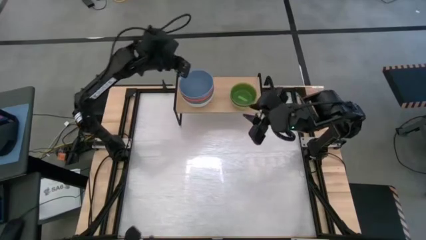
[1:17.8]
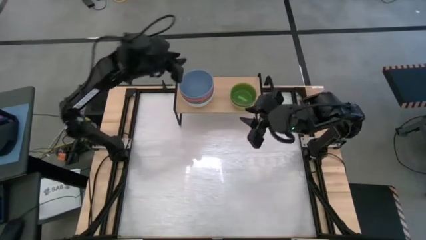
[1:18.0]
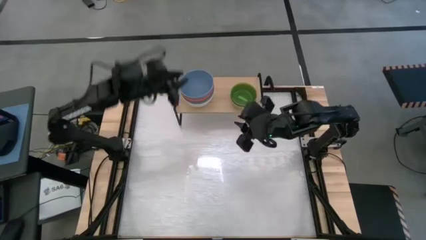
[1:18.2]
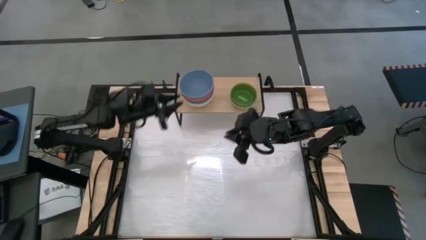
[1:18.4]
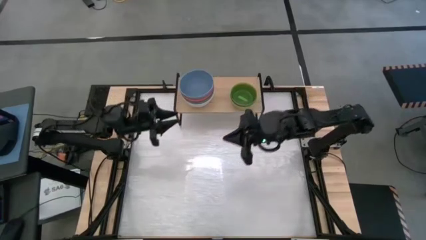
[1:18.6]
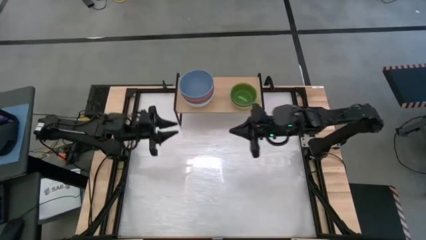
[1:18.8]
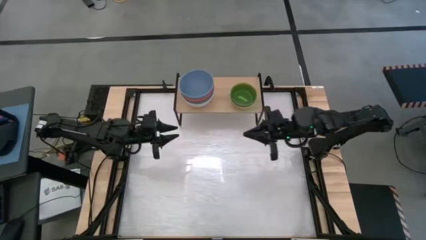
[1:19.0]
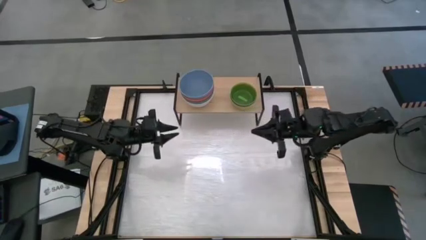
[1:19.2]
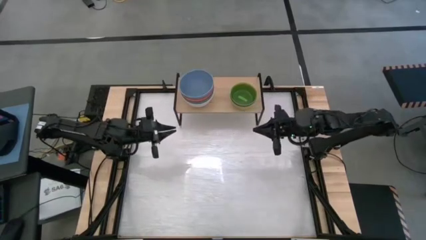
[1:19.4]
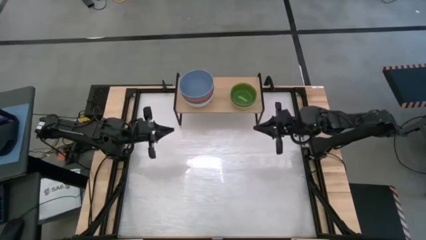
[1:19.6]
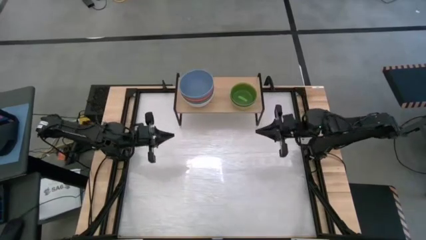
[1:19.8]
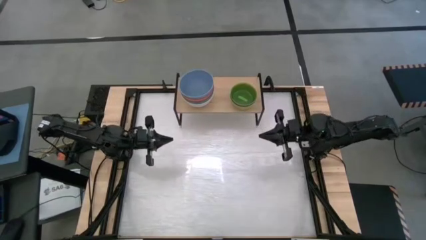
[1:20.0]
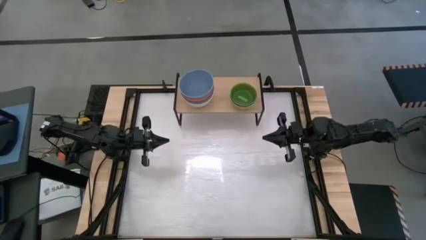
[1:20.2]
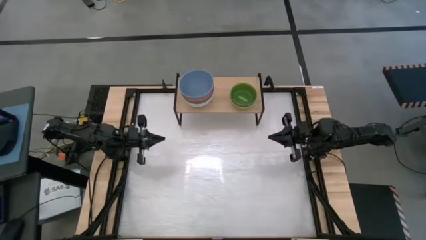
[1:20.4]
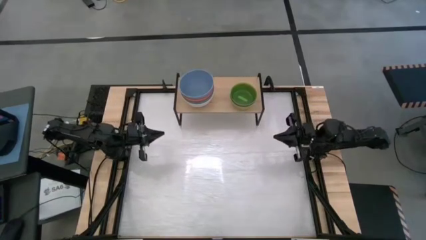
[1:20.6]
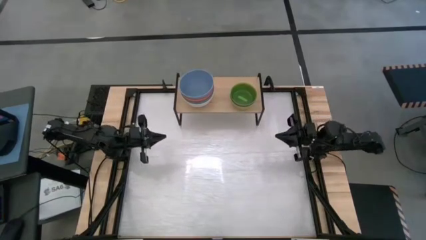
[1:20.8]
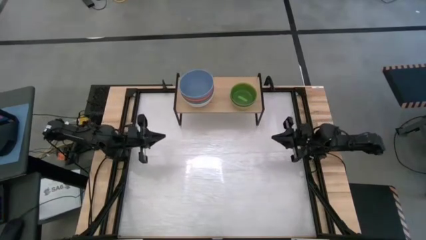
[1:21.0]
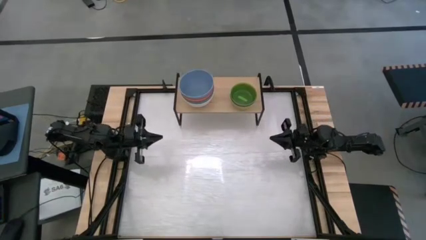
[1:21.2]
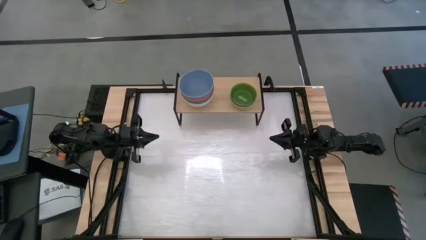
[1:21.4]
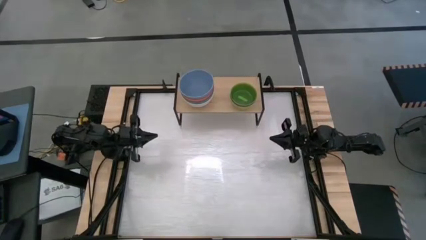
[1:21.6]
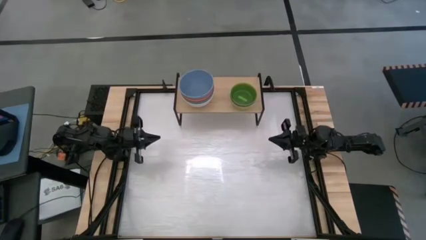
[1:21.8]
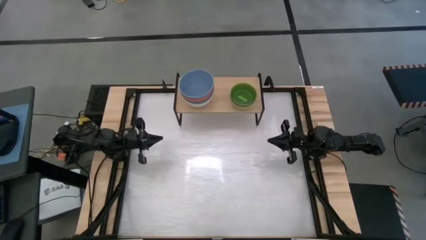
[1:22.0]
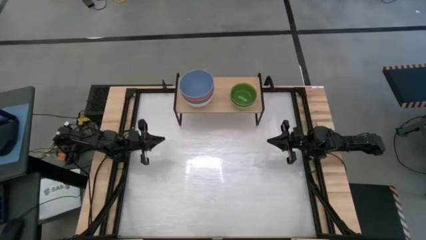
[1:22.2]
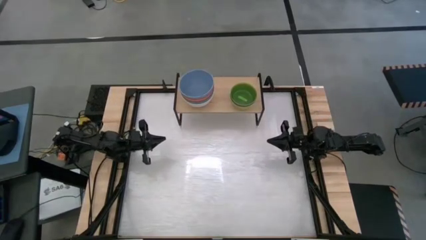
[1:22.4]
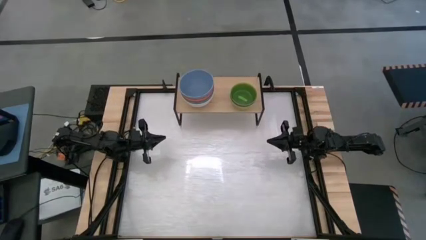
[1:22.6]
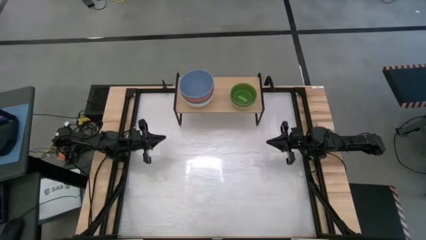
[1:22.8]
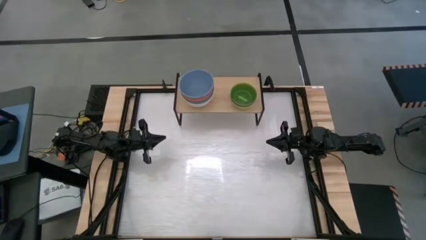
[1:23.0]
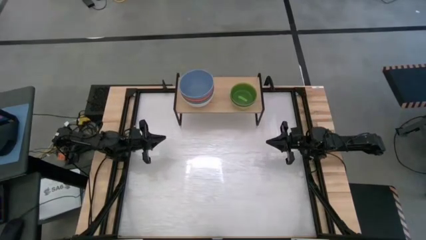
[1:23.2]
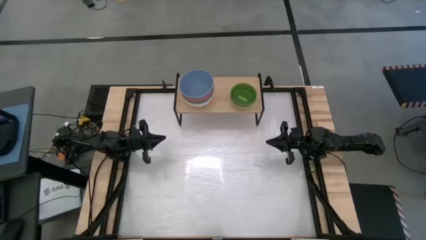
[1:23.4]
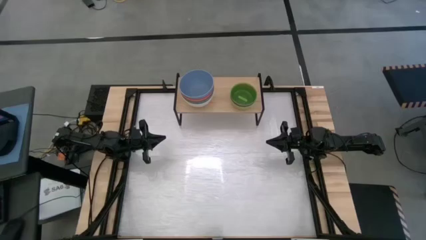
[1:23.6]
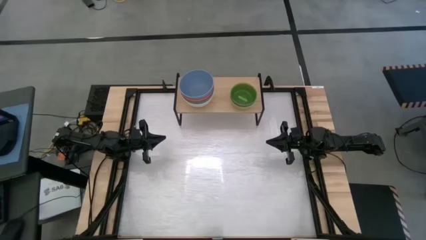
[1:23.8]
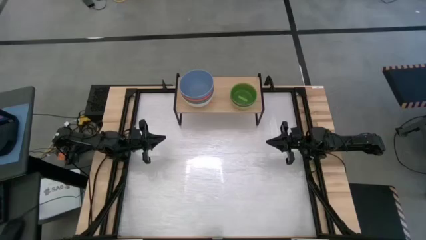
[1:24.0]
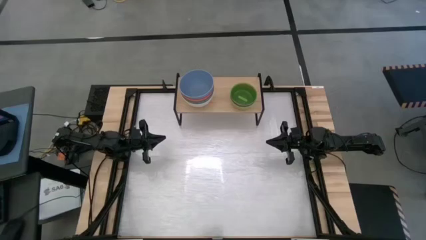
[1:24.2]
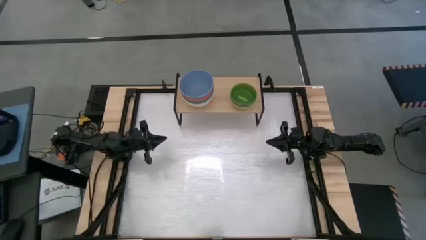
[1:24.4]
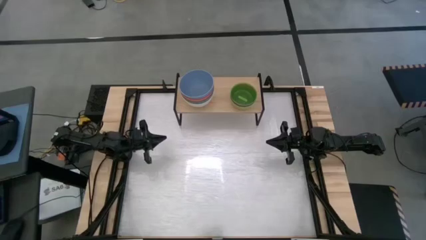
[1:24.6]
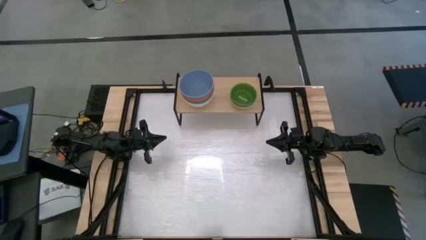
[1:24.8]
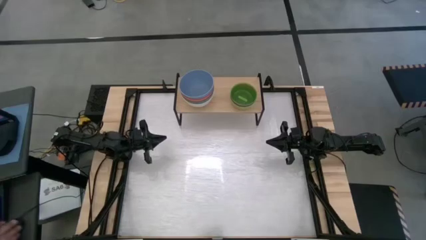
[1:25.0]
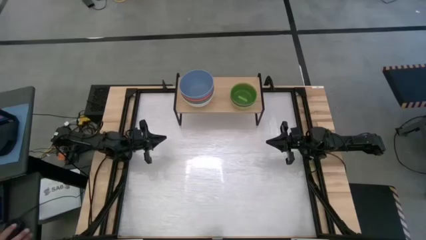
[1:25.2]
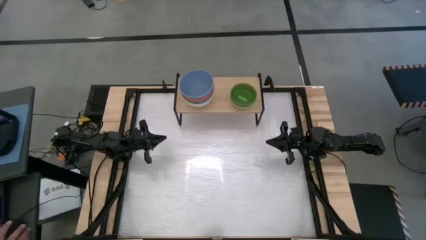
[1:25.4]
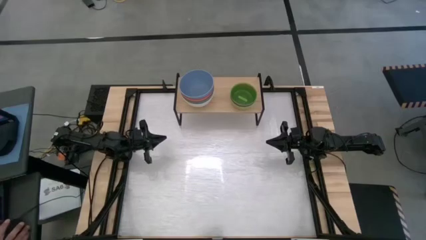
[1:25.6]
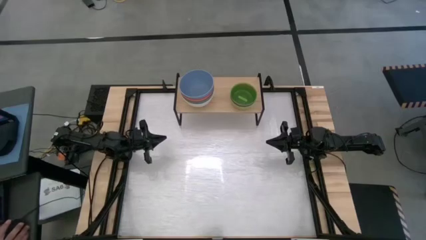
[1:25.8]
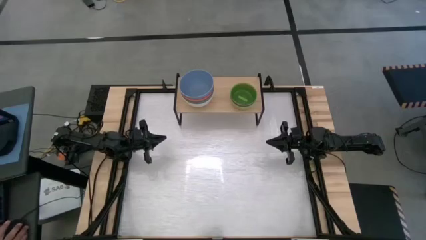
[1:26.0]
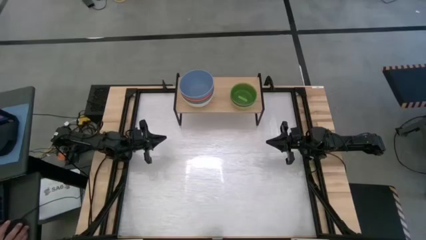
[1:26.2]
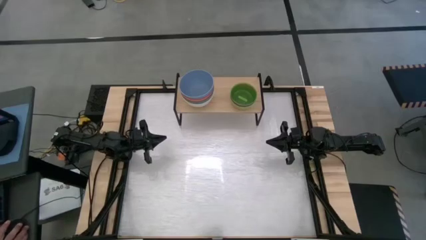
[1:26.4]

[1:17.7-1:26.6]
Task: Place and stack bowls onto a shelf
Return to Home Position

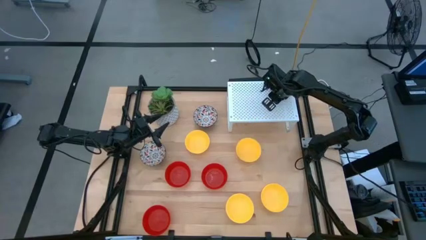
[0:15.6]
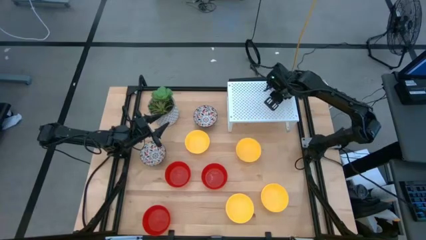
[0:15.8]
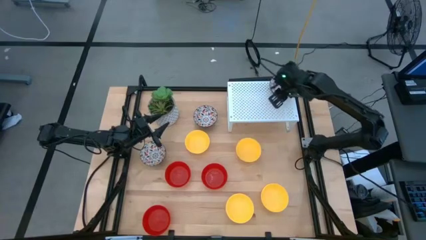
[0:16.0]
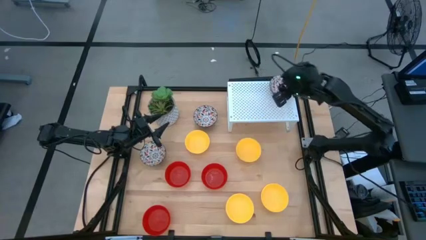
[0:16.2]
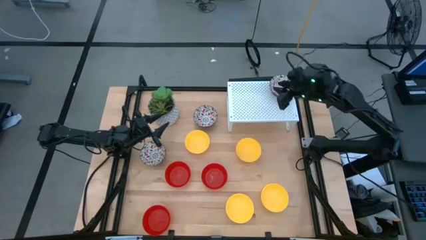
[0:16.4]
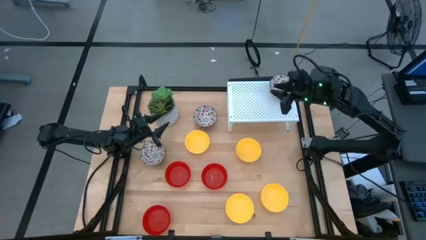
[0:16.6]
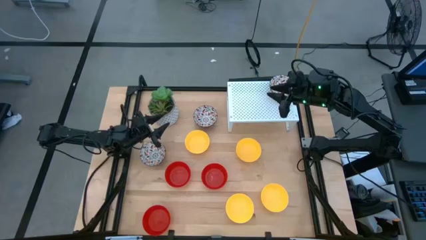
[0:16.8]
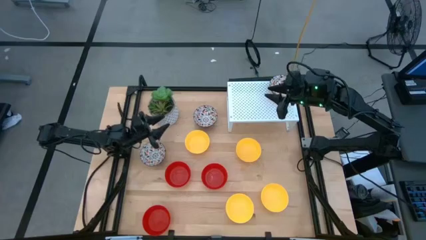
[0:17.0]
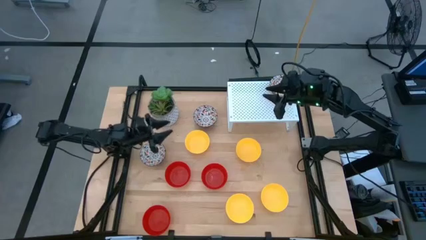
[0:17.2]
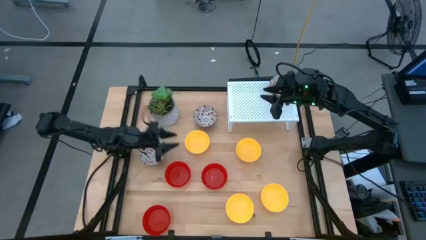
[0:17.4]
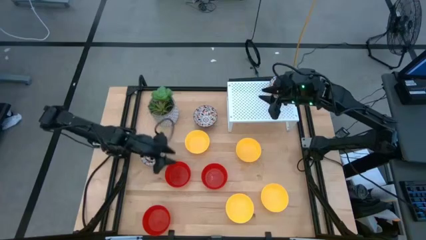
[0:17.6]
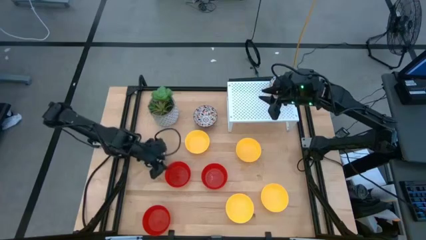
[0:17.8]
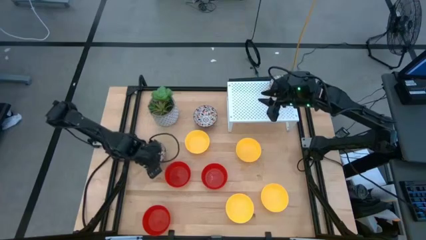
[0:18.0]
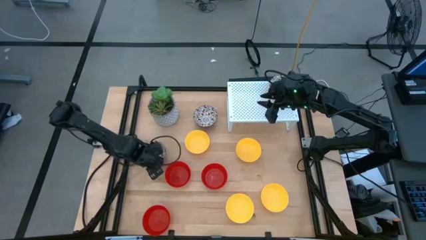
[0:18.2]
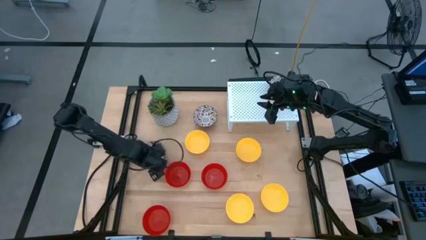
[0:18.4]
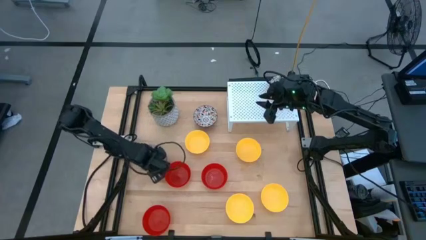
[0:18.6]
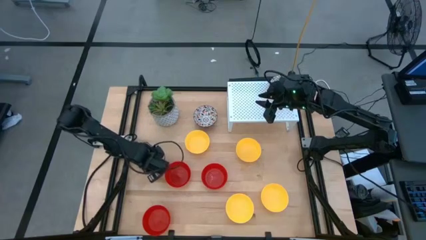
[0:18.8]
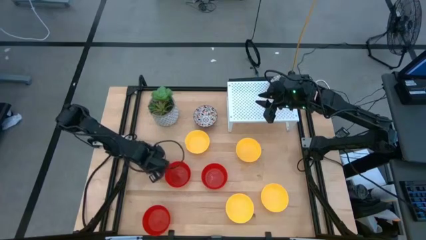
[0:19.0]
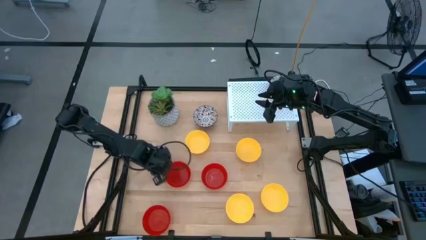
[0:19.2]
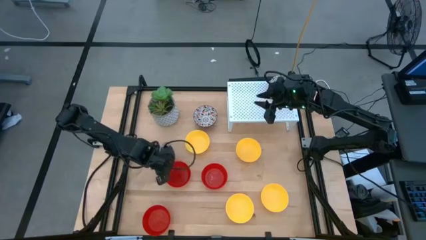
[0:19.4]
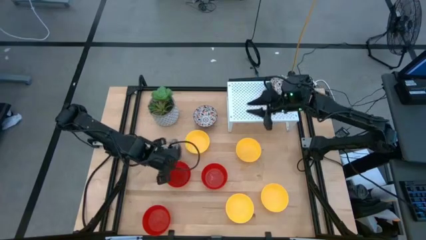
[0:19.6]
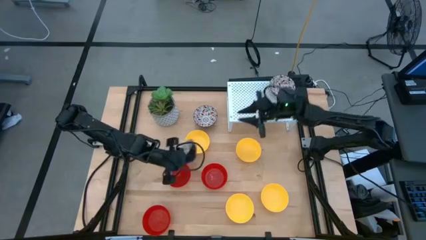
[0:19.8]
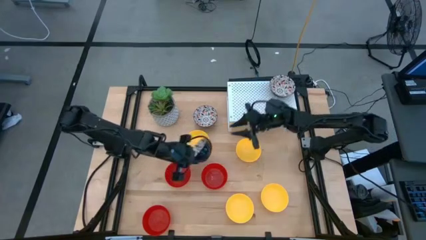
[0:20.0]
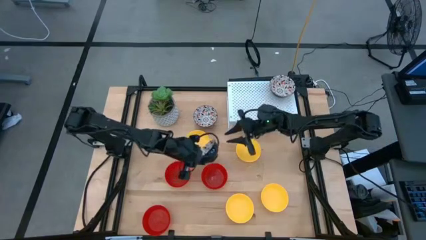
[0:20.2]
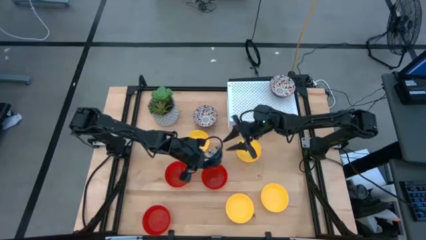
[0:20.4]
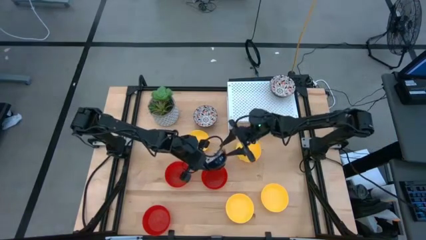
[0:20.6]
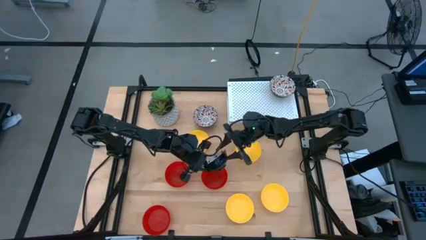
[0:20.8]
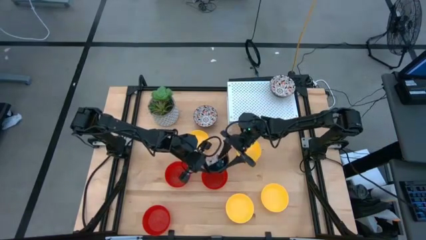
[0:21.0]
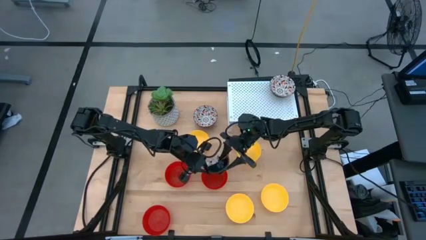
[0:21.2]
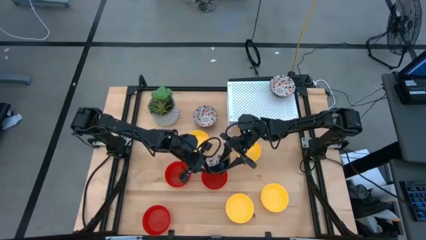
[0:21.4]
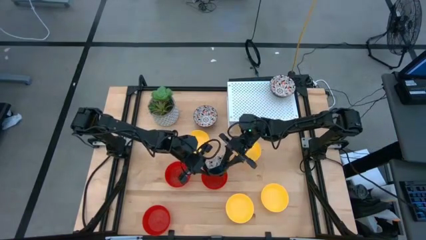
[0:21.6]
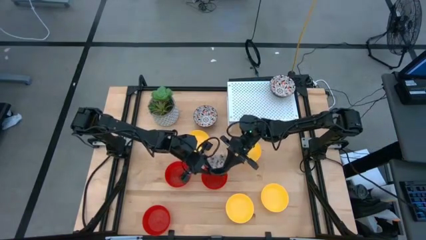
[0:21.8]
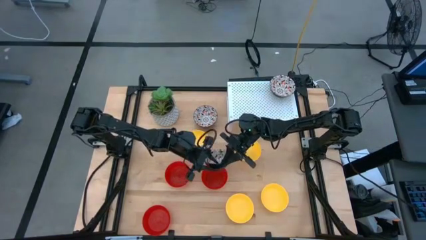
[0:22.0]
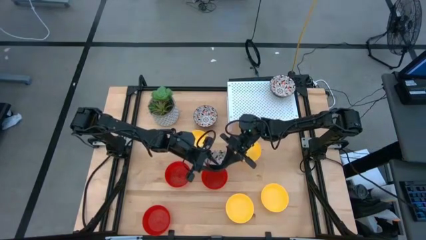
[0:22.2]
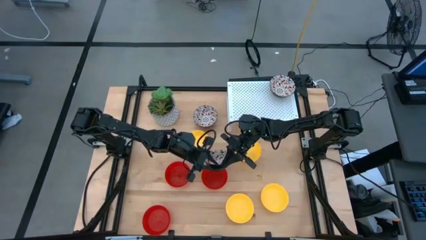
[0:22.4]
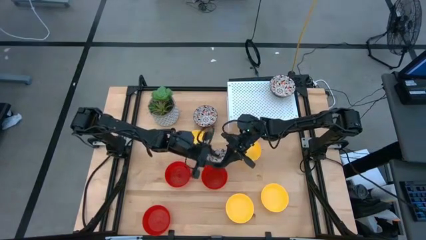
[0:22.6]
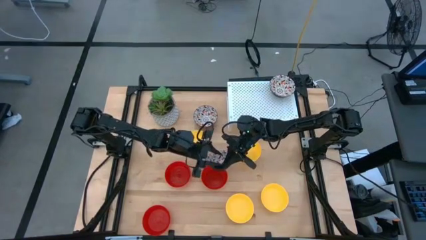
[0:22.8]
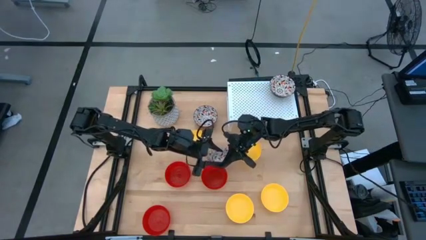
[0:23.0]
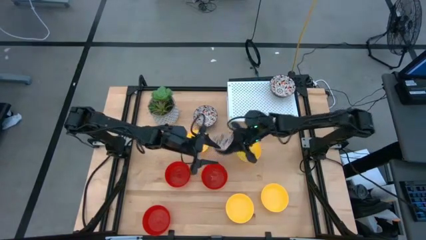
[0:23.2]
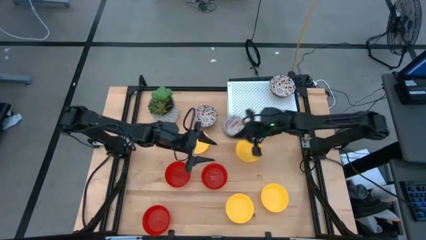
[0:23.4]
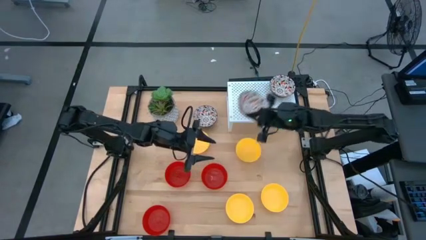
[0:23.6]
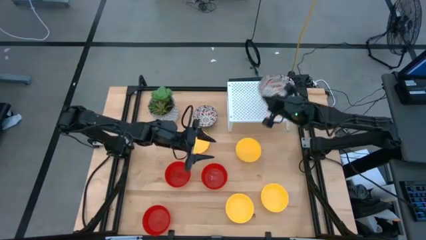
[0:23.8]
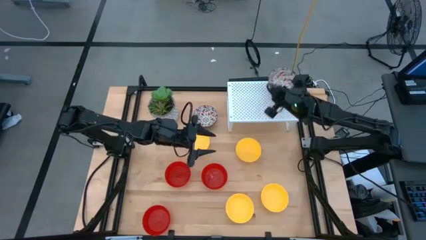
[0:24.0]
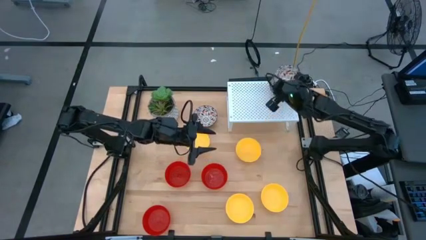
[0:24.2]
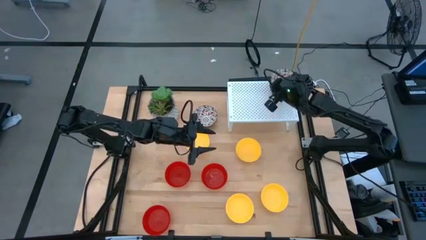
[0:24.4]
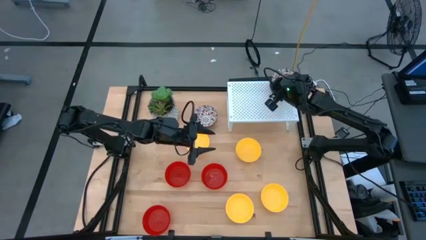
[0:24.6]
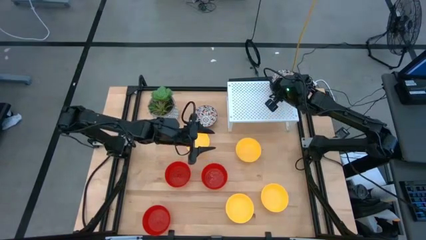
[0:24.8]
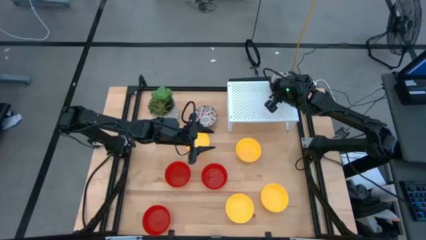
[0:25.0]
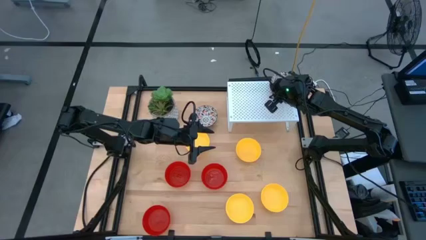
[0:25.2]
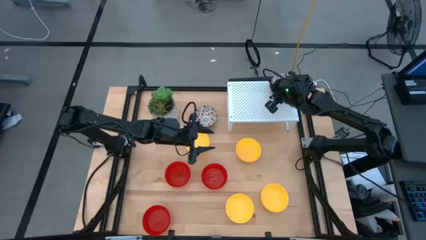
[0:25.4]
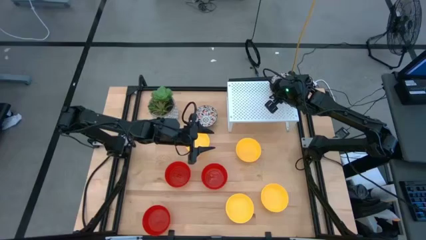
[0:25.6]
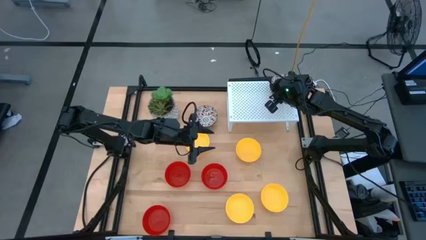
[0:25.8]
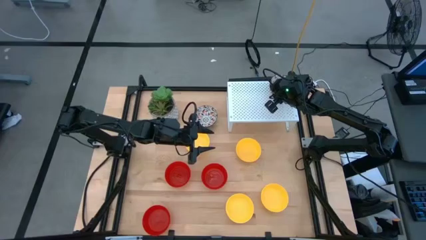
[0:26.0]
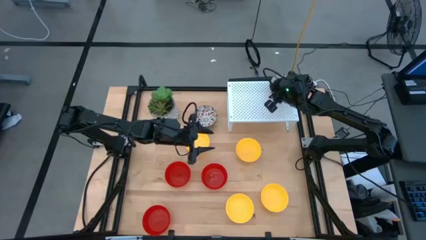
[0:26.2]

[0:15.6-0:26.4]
Task: Pick & Place Mini bowls
Stack the white and black bowl on top of the white and black bowl on the shelf
